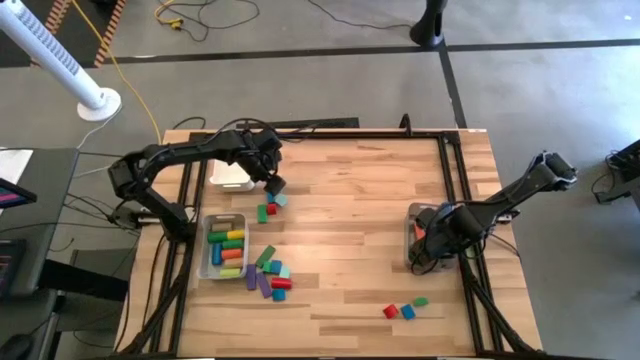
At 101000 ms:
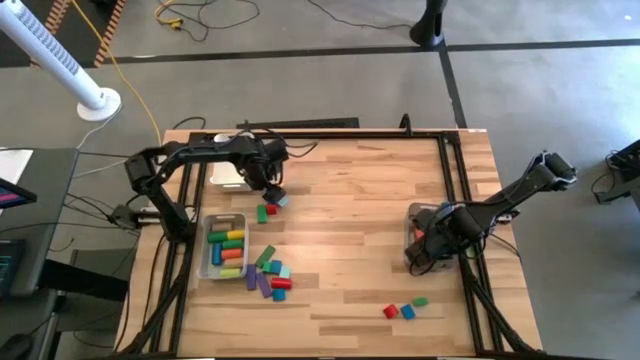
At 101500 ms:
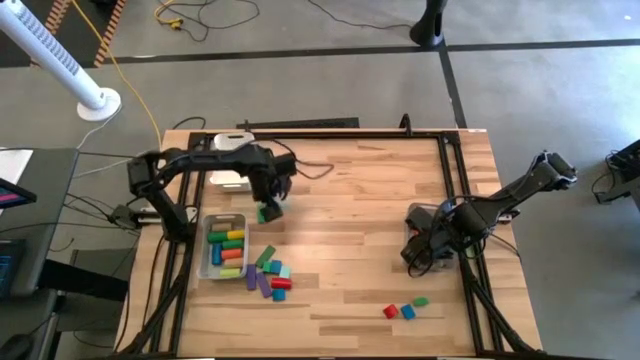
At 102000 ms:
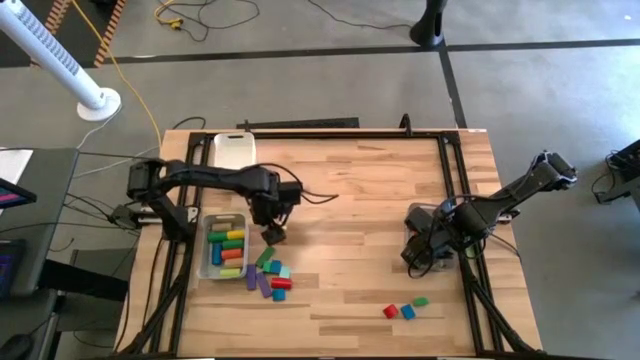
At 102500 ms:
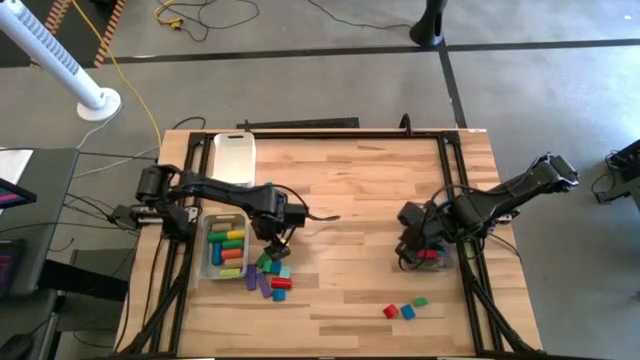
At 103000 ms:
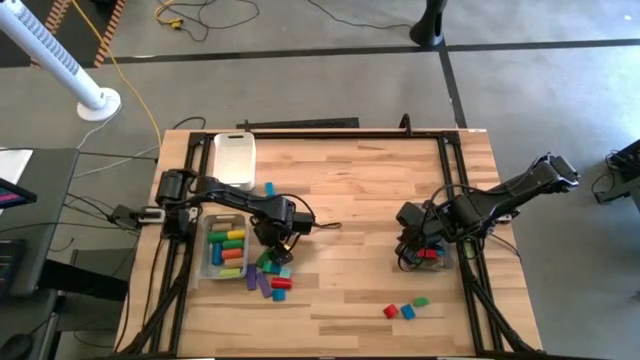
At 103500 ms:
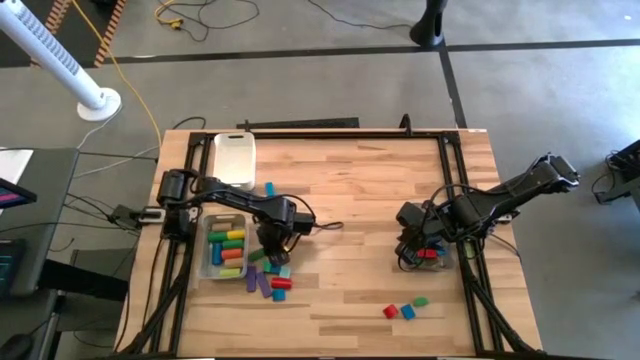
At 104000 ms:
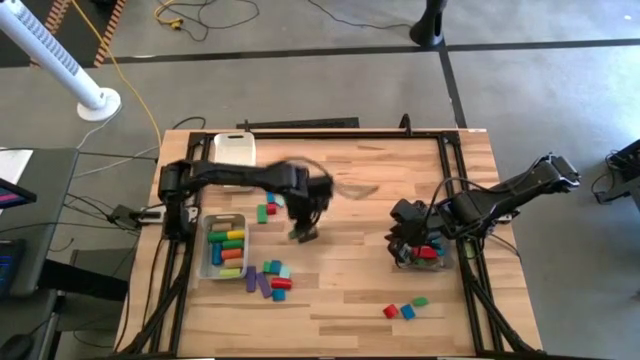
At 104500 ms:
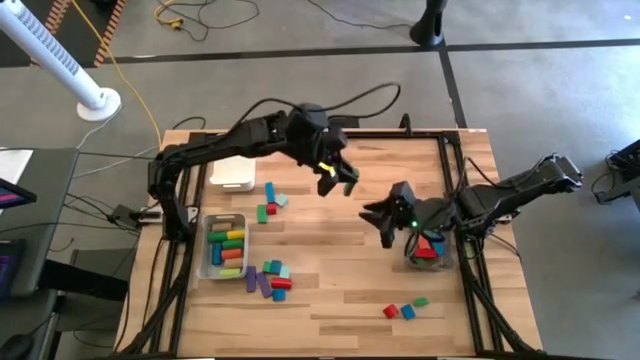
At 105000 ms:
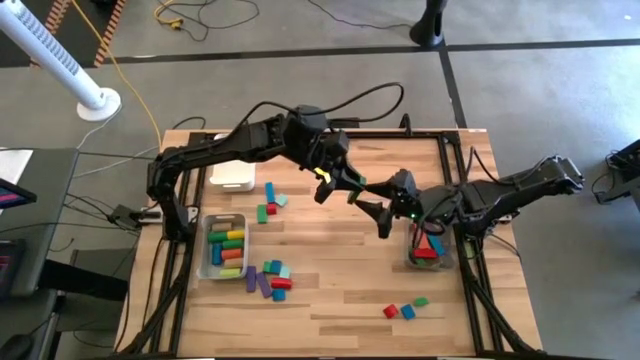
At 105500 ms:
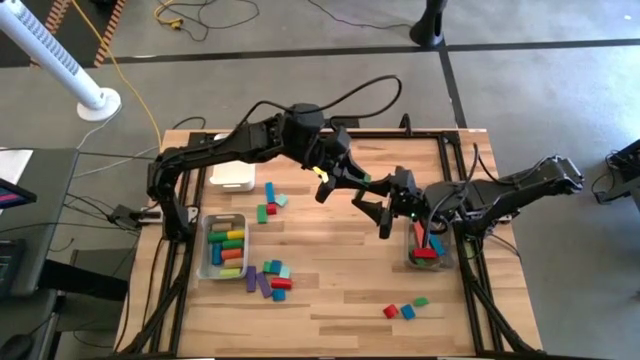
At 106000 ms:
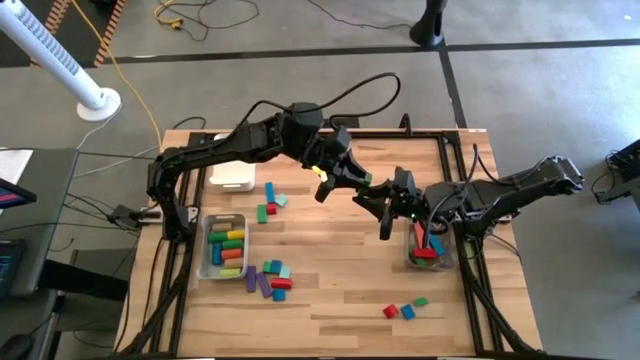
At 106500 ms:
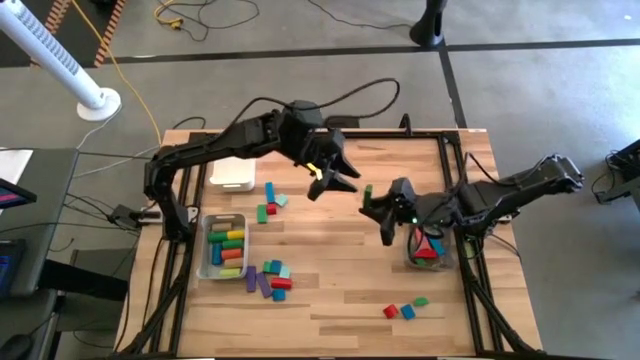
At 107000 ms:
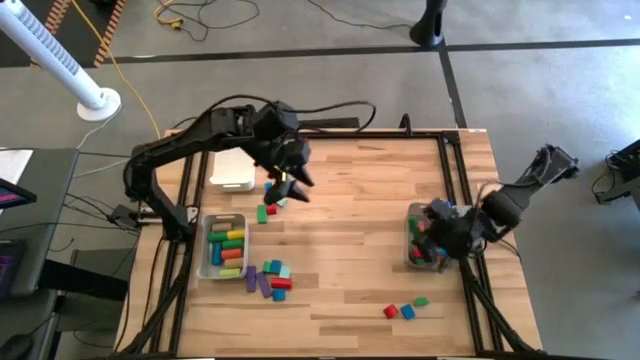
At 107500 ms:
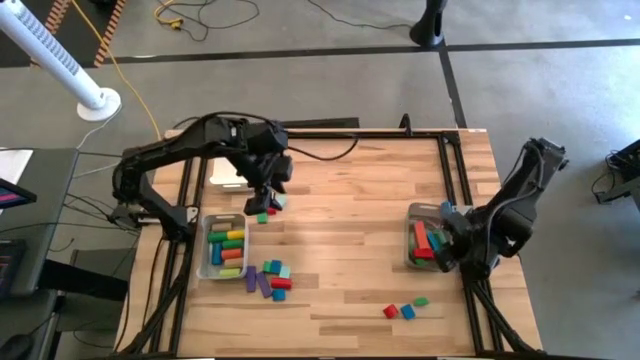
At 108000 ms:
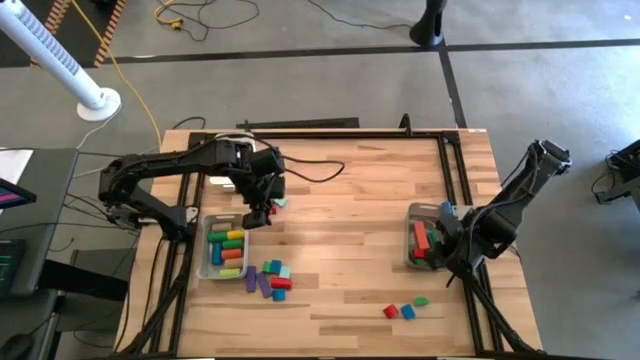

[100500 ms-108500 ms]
Task: Sort blocks by size
Put the dark green rectangular block into the black bin

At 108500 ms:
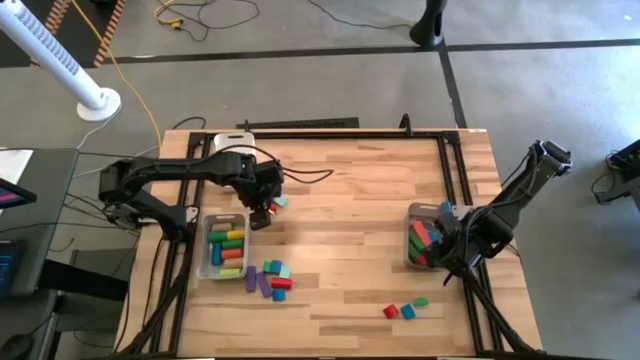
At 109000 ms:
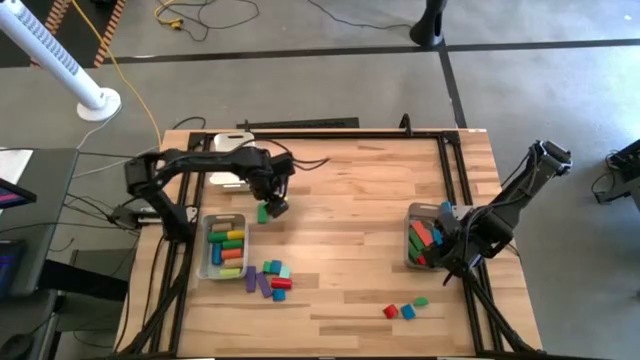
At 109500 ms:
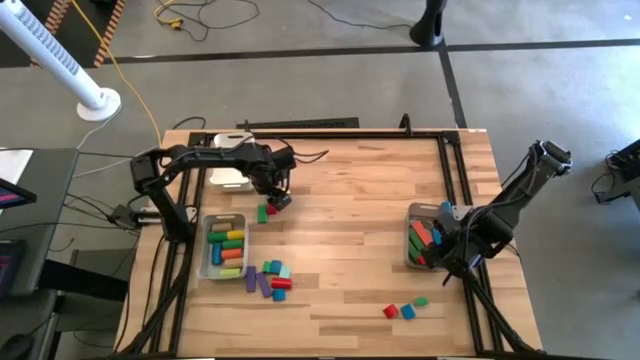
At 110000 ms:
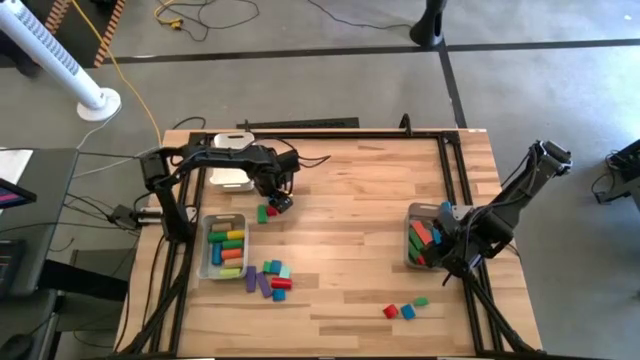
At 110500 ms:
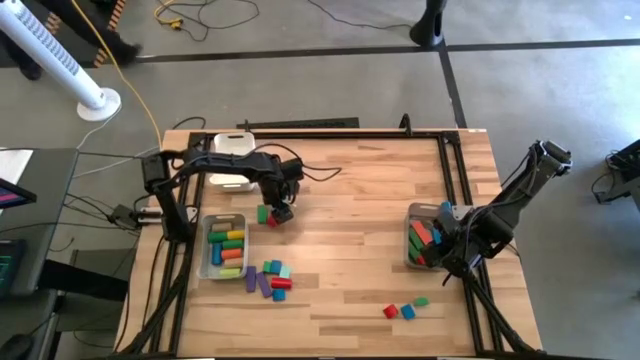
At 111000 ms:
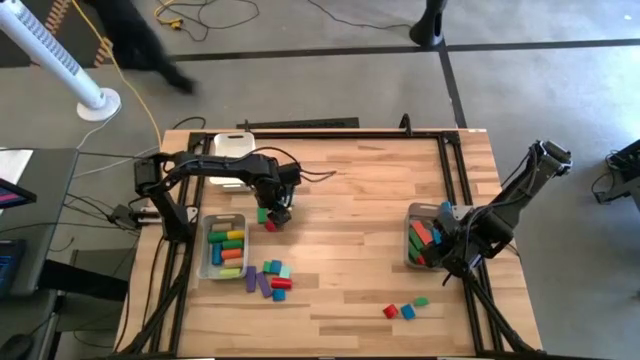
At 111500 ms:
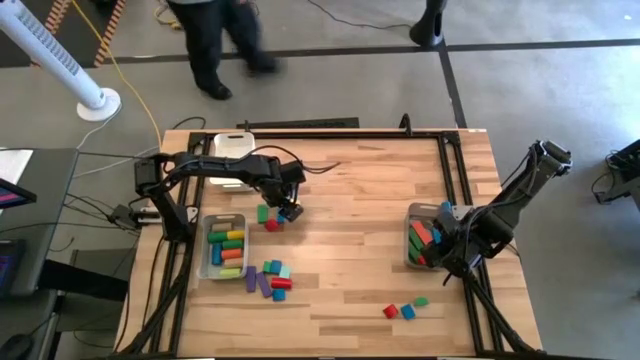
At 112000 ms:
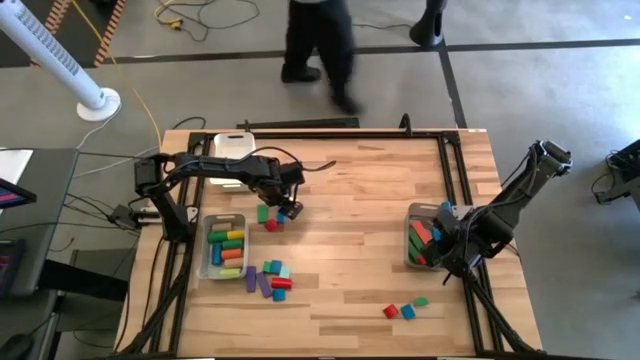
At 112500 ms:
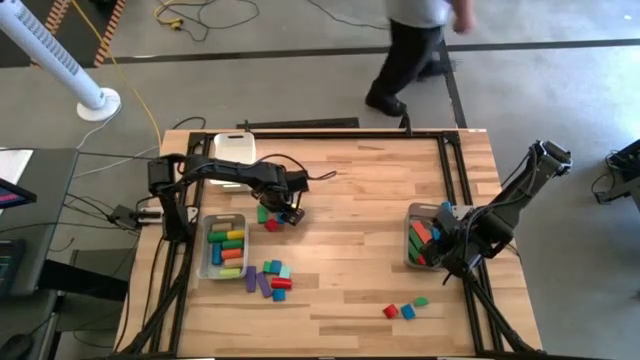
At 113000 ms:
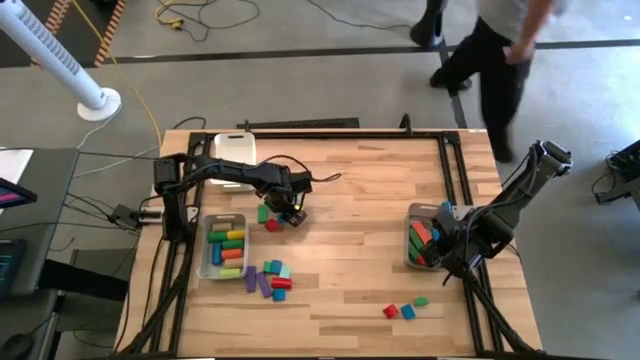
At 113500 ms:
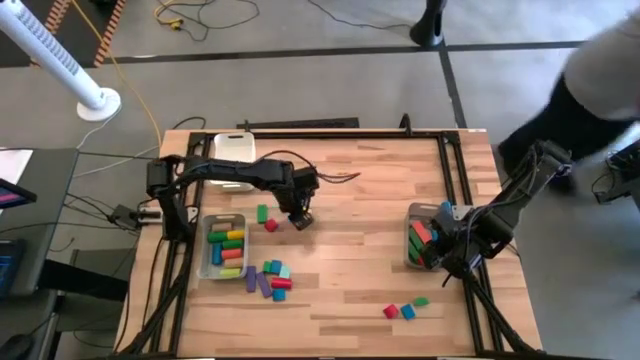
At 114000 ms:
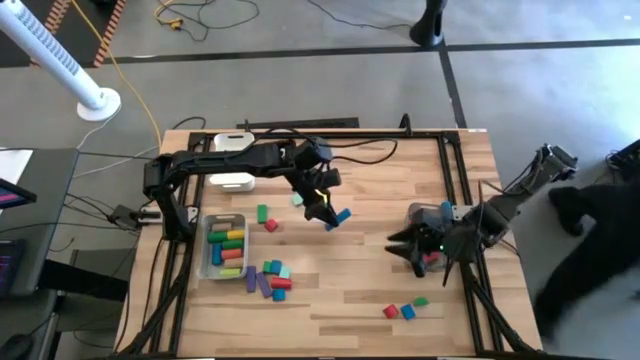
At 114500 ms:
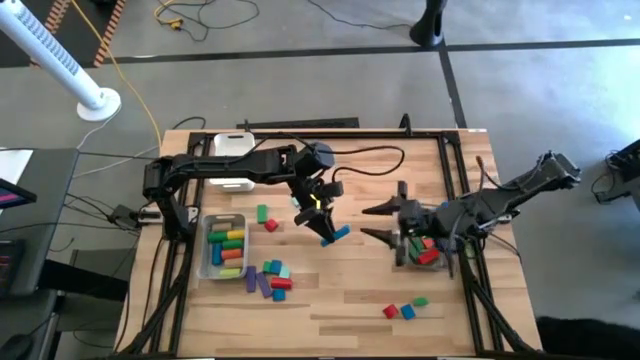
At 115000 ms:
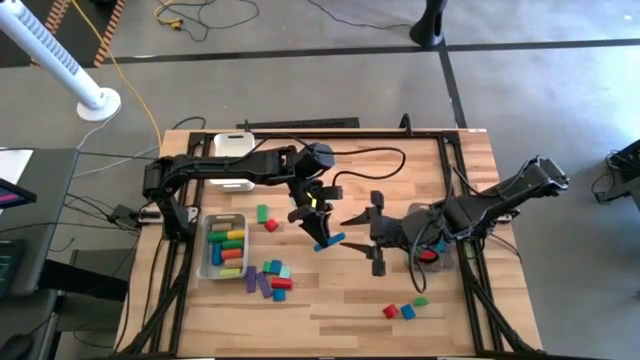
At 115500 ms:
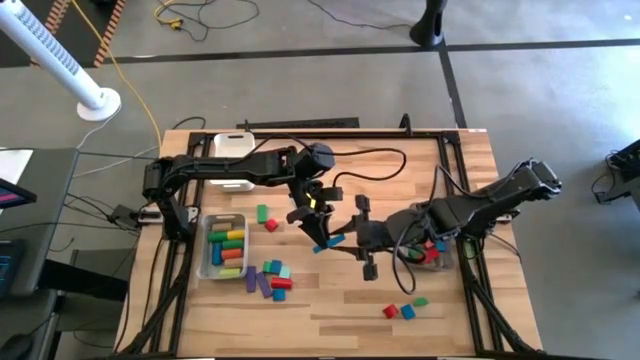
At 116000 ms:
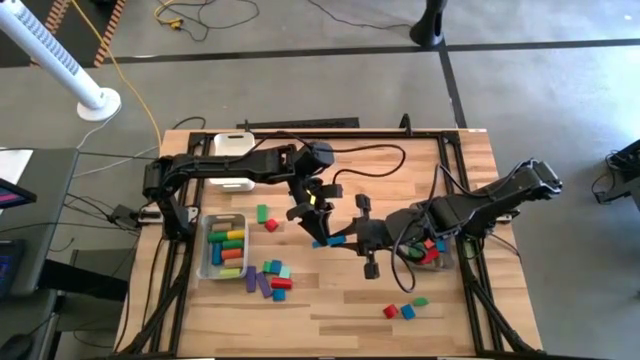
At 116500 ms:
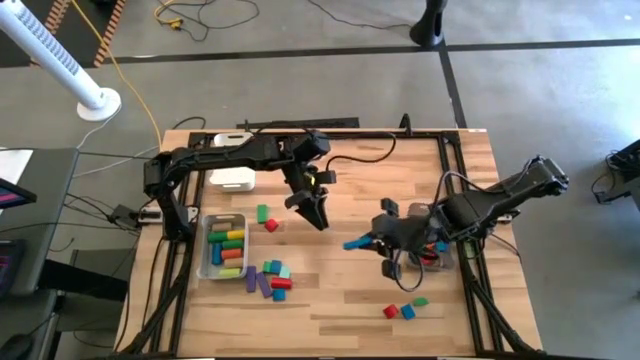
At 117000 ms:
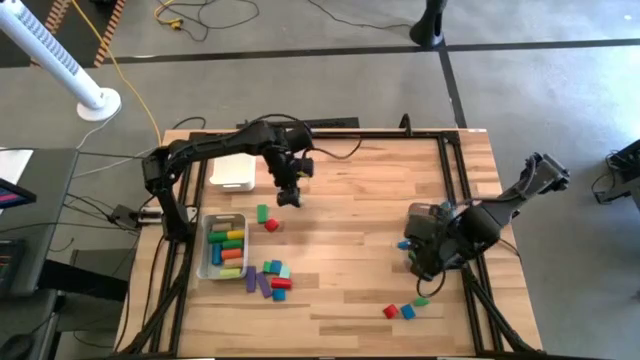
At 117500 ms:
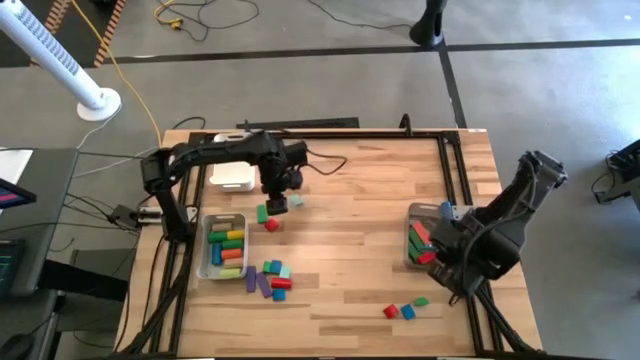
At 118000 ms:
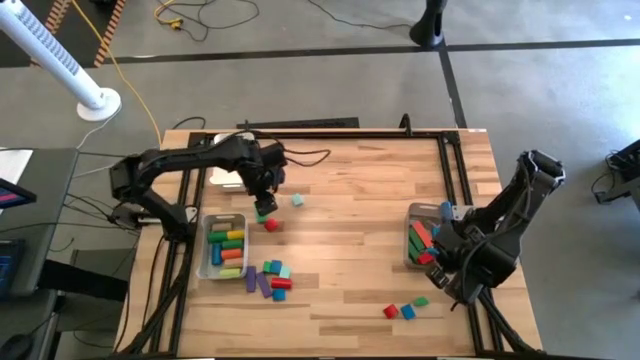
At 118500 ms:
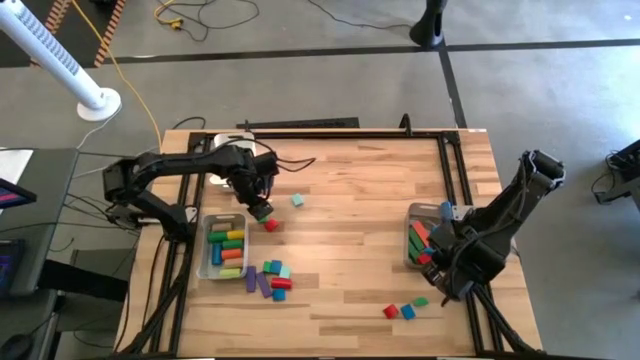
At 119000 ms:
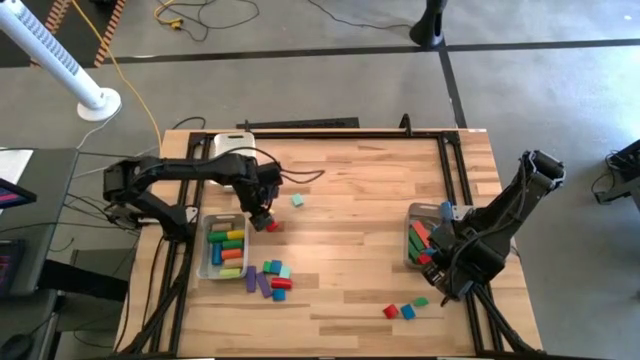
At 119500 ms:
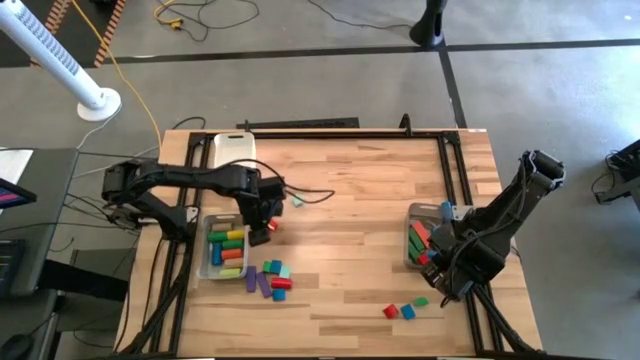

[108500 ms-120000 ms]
Put the blue rectangular block into the black bin

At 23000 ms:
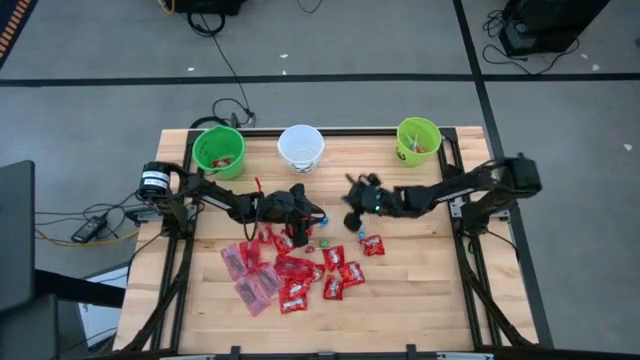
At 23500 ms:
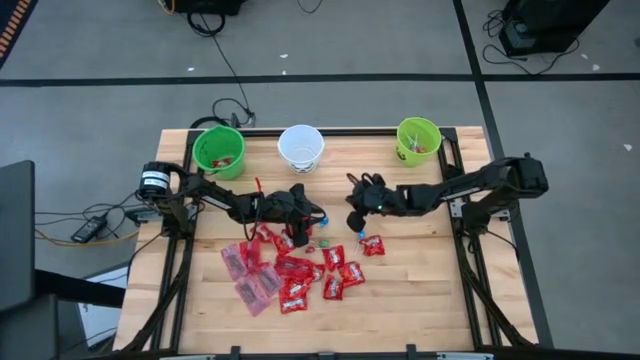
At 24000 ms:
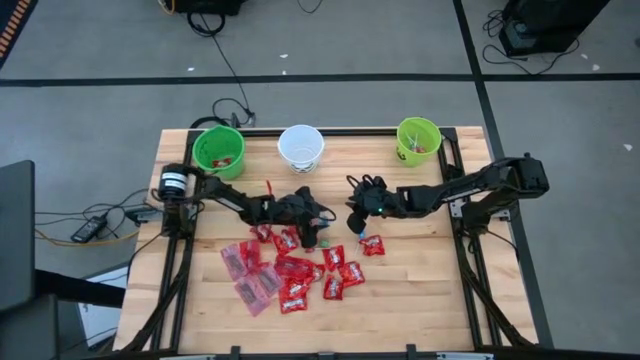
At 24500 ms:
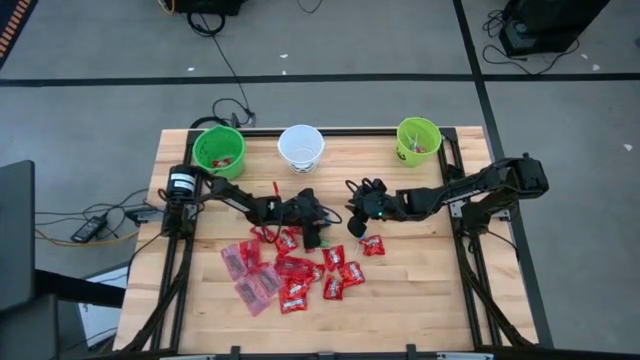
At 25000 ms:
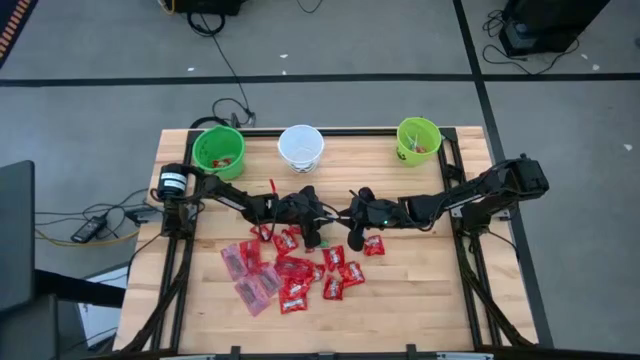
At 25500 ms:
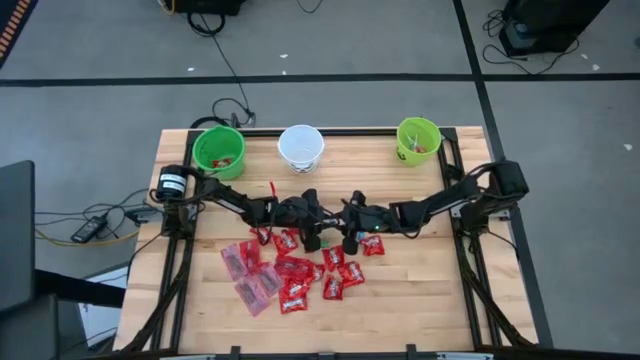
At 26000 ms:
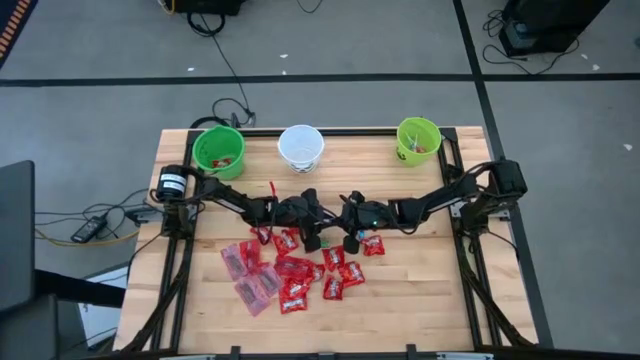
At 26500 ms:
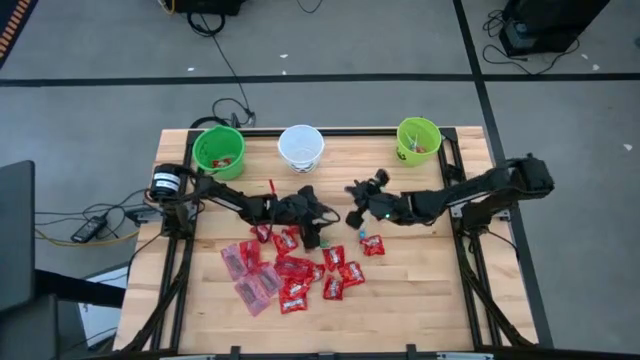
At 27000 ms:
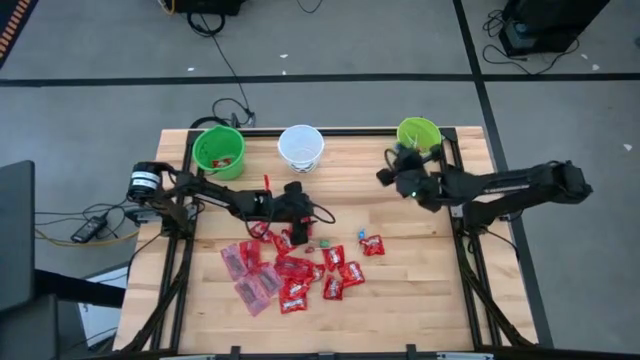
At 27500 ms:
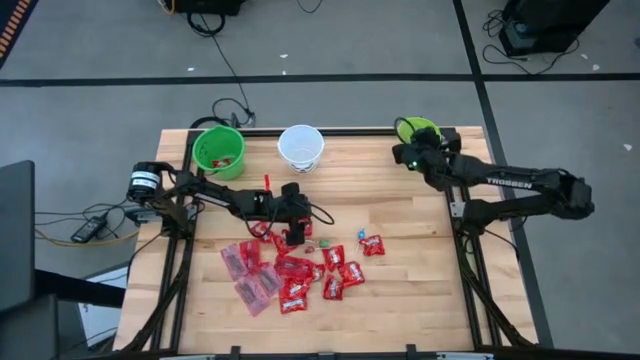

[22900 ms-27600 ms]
Task: Sort candy by brand, put in halloween buckets
Put the blue lollipop into the light green bucket
